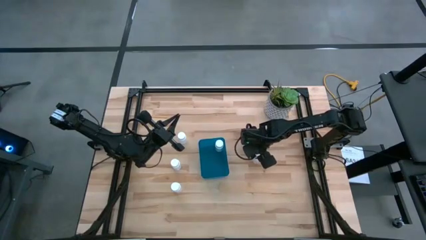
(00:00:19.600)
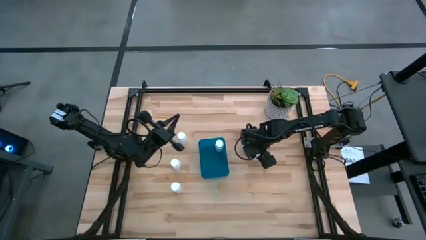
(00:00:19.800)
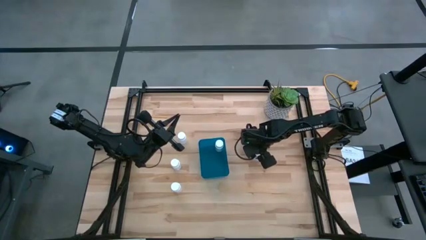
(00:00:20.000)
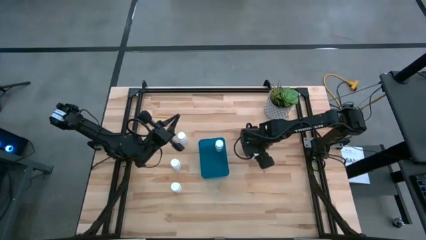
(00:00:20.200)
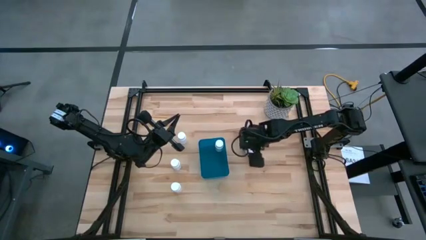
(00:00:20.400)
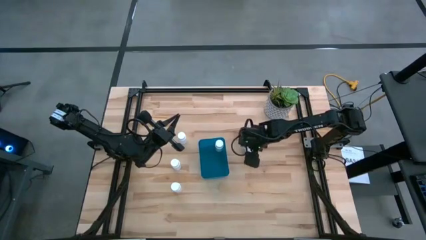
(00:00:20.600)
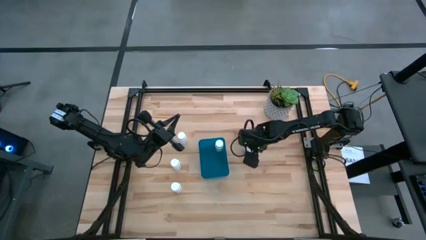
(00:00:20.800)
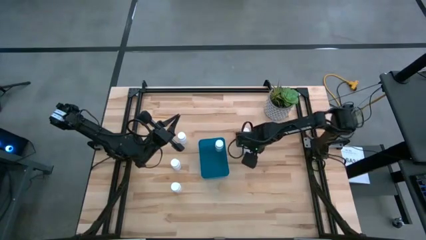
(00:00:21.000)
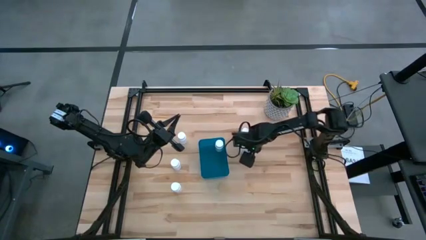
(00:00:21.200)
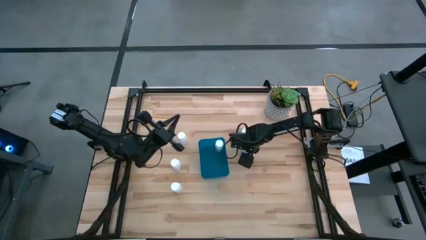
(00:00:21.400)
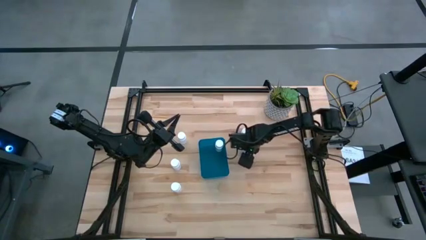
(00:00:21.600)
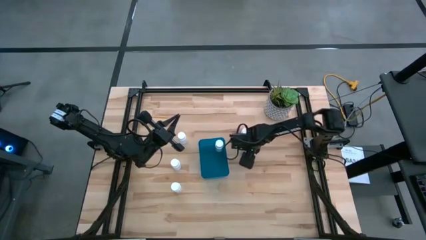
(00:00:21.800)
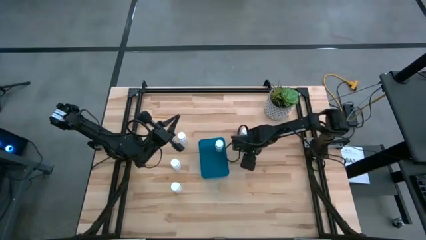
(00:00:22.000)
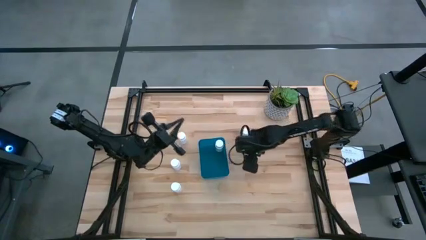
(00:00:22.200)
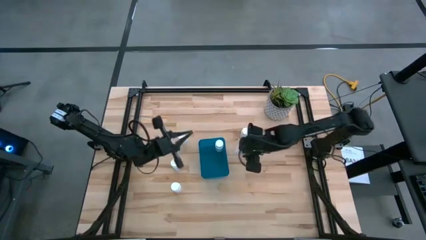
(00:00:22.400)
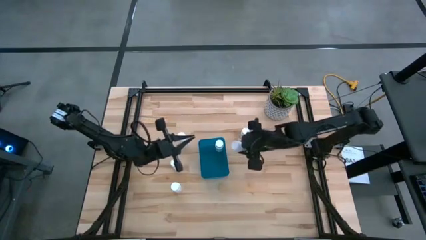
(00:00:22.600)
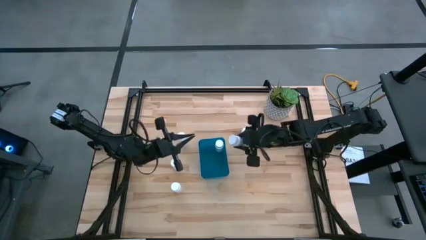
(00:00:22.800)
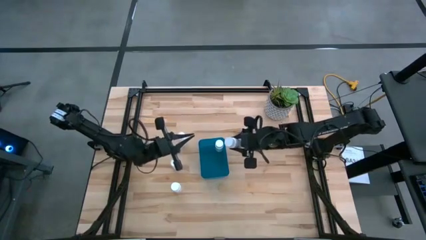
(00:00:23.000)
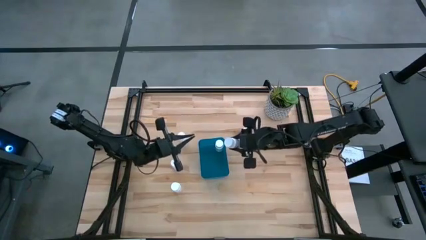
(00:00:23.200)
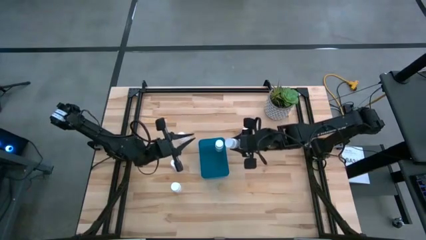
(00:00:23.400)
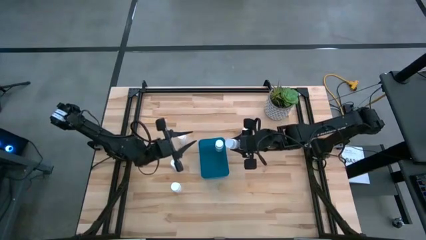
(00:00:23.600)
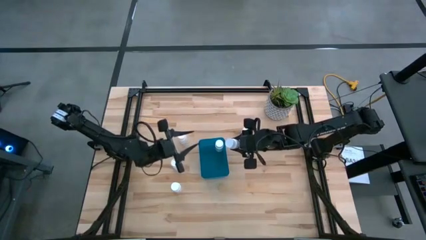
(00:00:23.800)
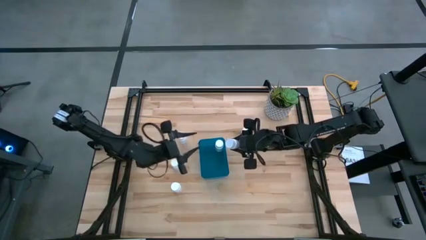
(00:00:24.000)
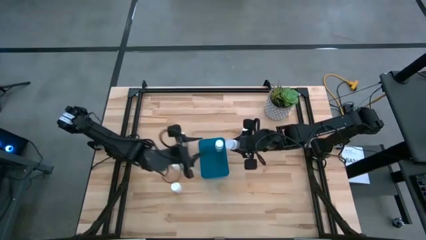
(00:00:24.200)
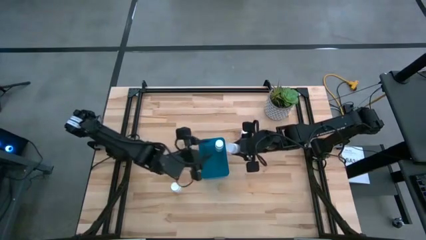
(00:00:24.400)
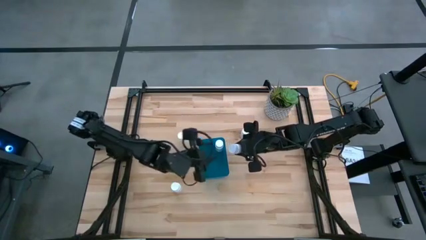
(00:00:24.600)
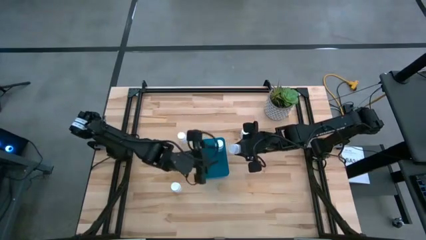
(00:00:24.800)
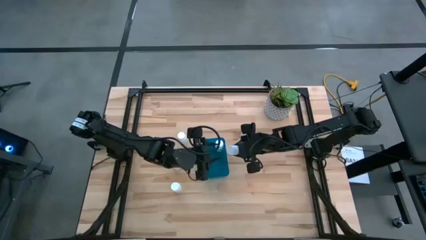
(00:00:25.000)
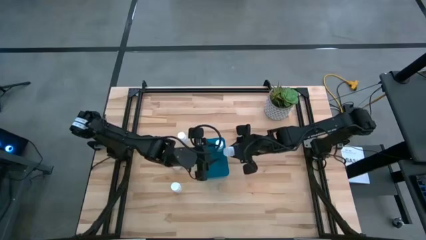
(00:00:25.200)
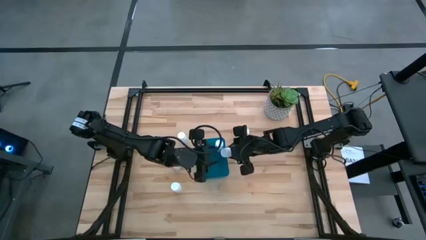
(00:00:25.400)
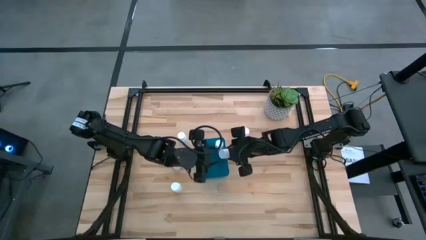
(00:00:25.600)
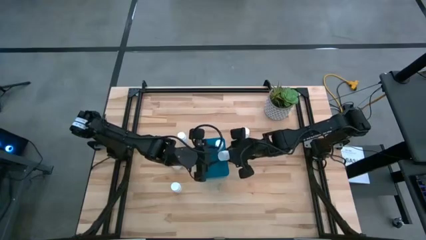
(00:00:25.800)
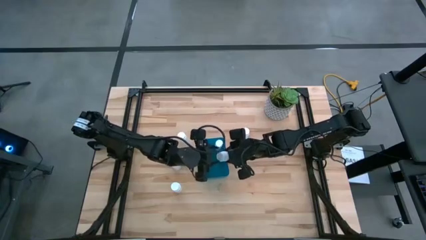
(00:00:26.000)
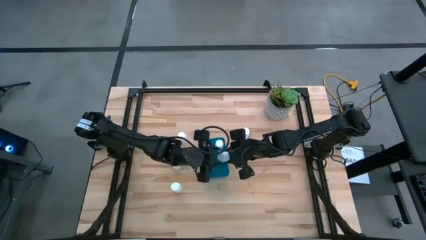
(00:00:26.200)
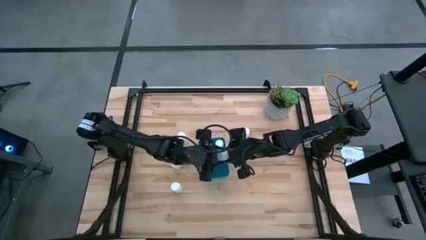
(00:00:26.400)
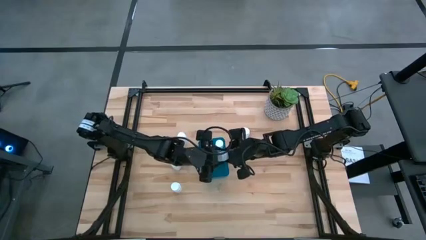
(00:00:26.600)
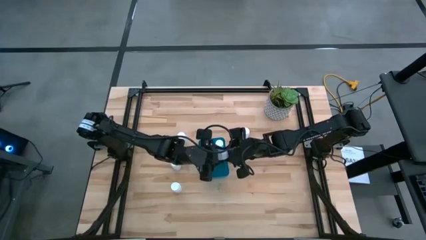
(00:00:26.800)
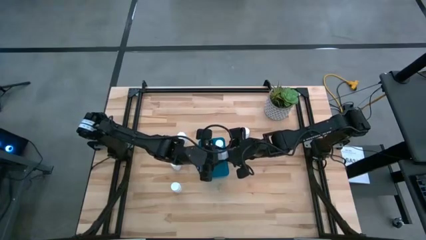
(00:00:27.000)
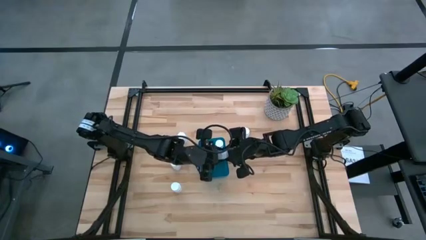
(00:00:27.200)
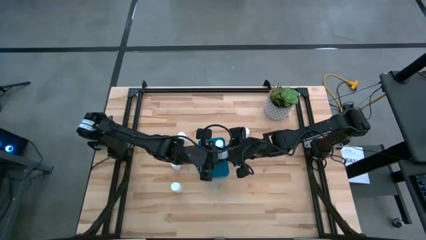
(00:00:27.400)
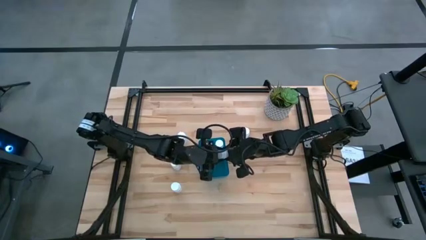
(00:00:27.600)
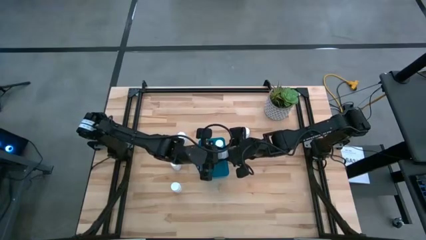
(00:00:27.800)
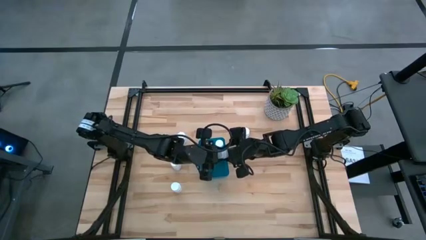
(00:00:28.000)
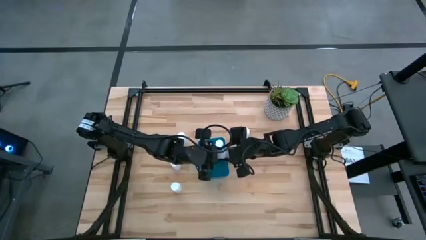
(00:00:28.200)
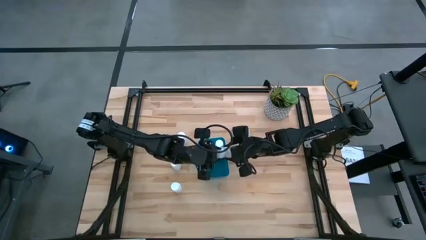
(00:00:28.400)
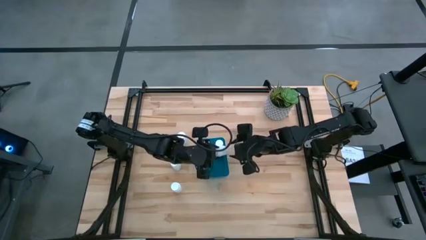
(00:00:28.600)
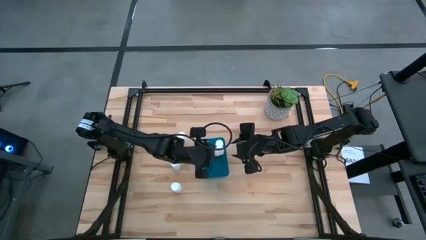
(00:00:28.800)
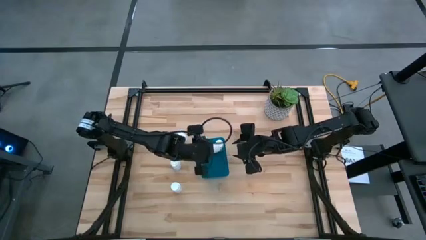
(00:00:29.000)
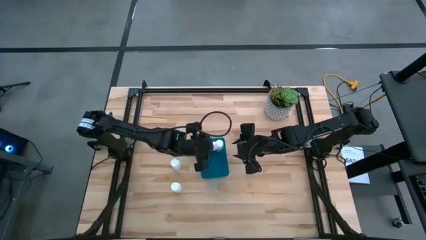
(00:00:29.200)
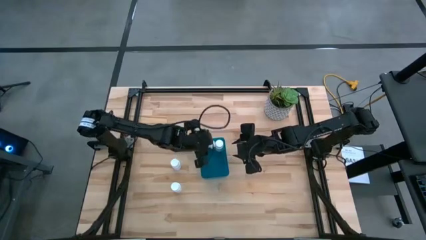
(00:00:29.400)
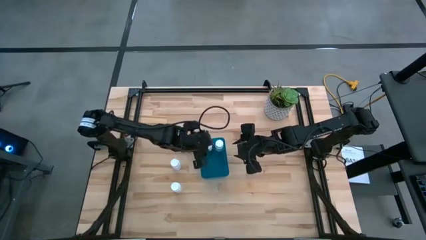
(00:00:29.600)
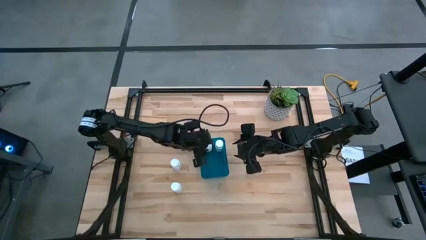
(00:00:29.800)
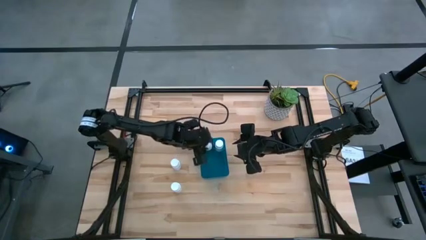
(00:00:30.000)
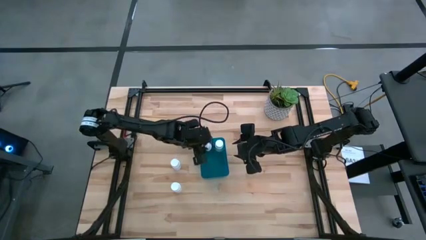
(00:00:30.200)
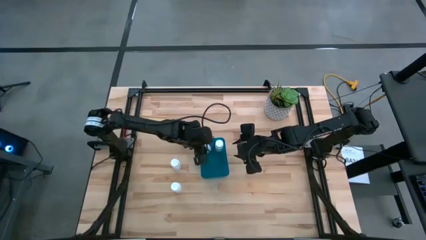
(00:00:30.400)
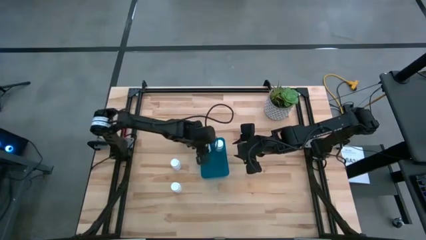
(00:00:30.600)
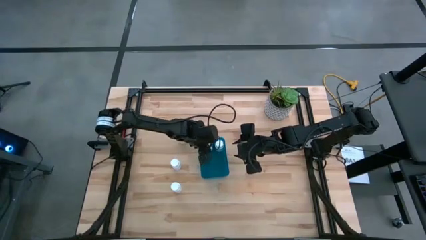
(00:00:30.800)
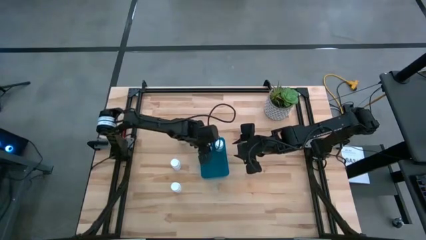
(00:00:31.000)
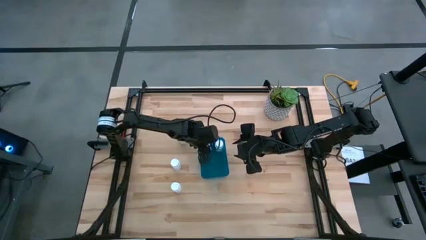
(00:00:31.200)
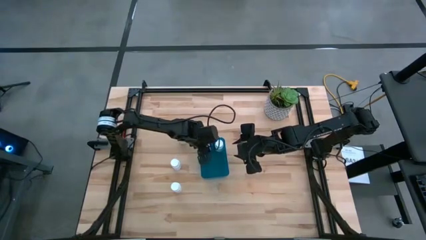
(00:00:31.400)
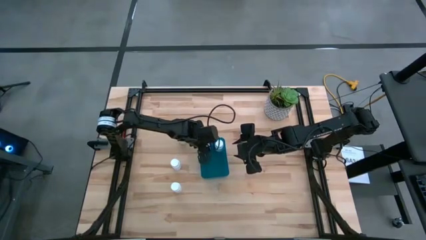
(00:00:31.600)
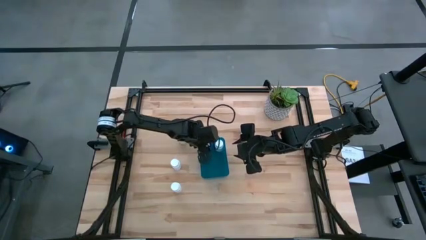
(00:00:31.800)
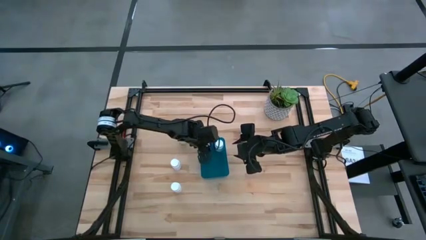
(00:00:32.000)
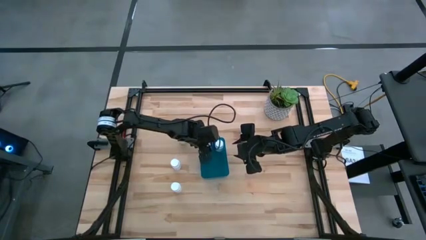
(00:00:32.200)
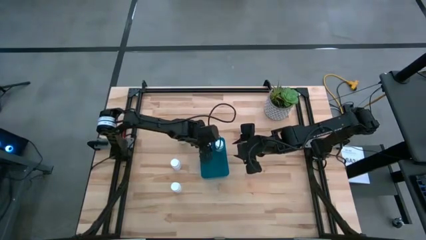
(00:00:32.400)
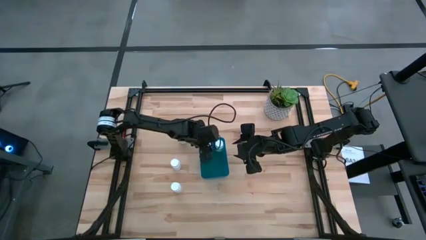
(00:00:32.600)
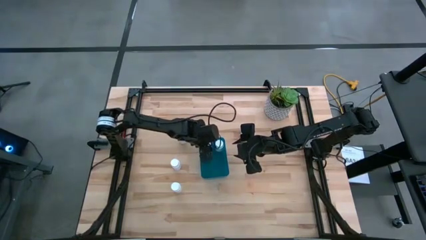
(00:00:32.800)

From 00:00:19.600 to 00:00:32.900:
Task: Pick and place pill bottles into a basket
Put the white pill bottle into the blue bin
